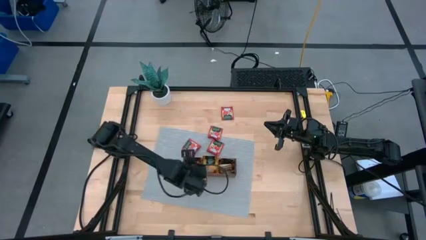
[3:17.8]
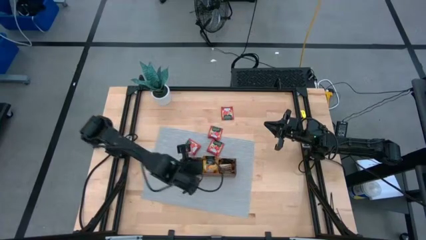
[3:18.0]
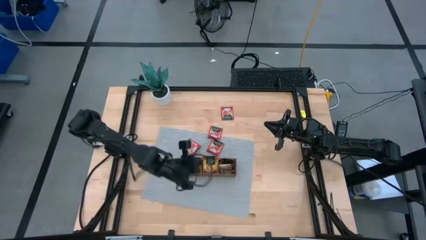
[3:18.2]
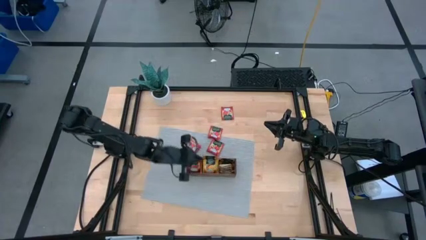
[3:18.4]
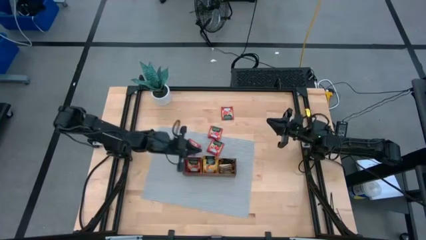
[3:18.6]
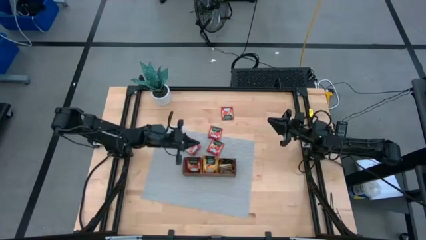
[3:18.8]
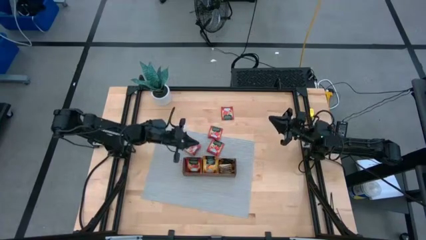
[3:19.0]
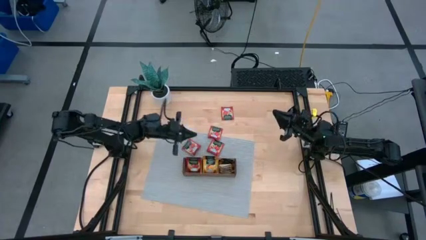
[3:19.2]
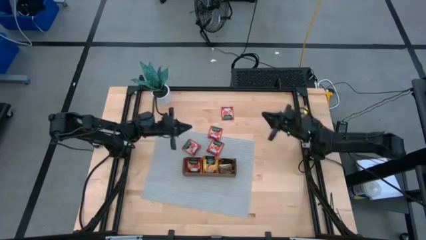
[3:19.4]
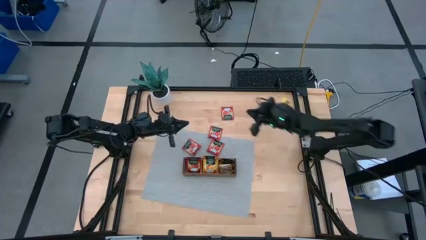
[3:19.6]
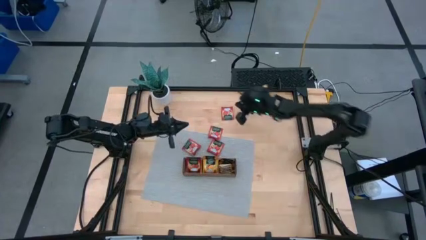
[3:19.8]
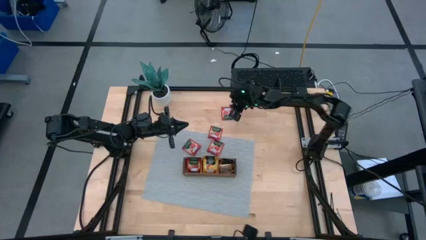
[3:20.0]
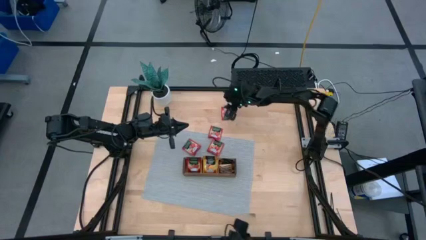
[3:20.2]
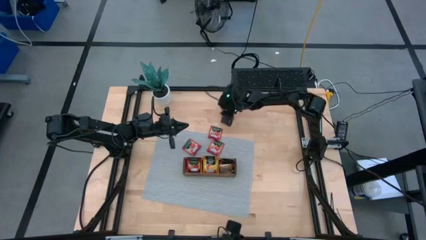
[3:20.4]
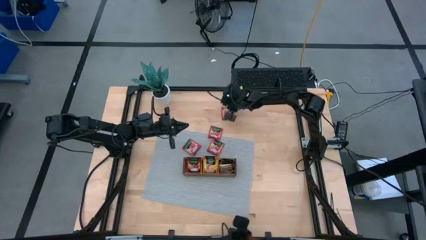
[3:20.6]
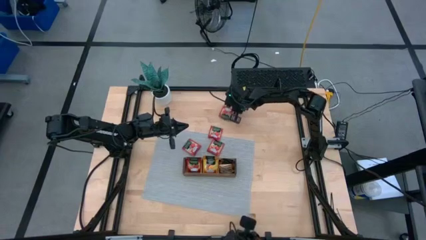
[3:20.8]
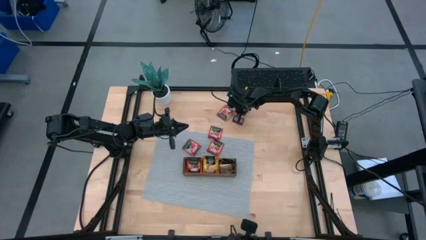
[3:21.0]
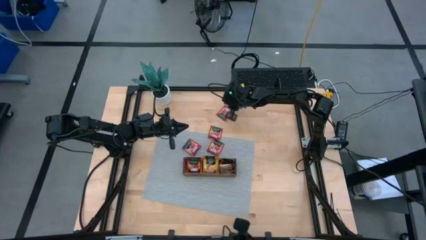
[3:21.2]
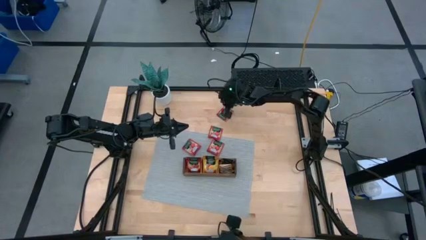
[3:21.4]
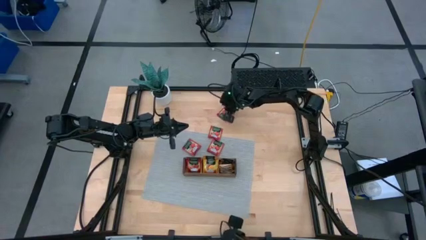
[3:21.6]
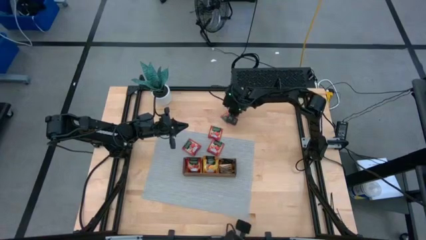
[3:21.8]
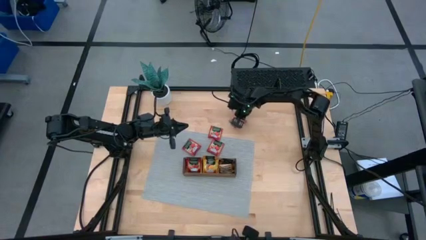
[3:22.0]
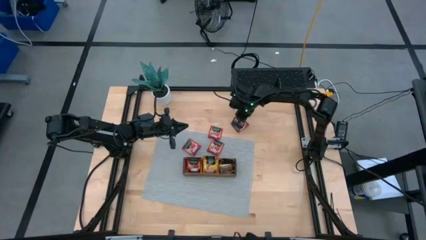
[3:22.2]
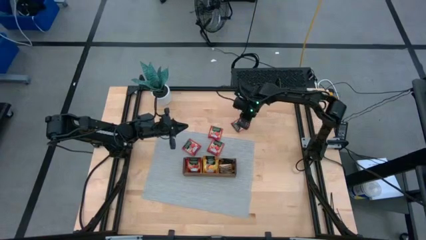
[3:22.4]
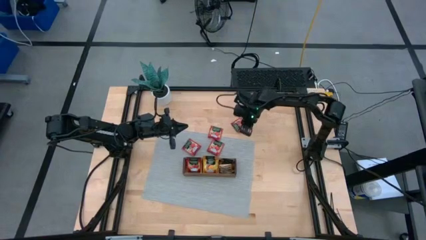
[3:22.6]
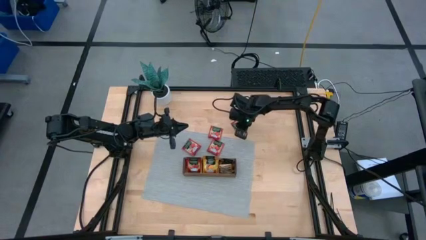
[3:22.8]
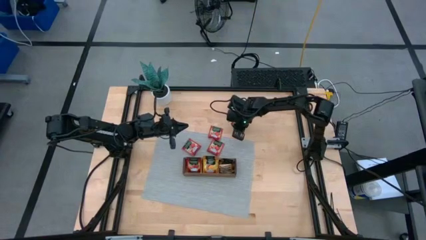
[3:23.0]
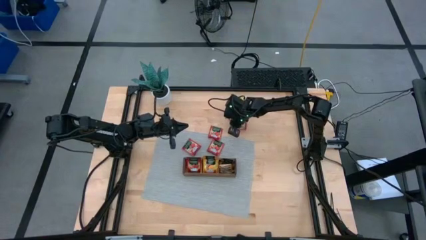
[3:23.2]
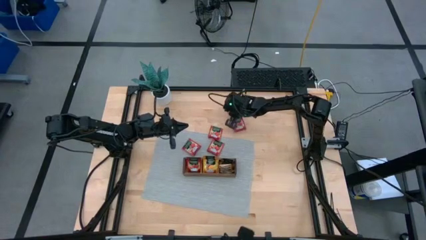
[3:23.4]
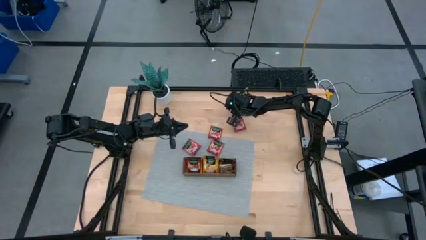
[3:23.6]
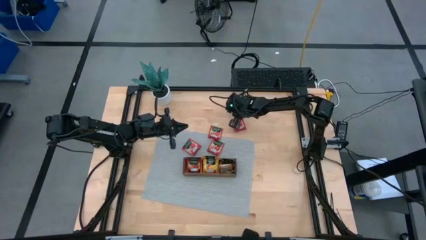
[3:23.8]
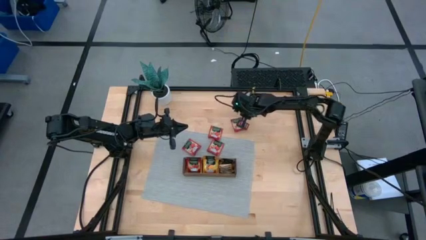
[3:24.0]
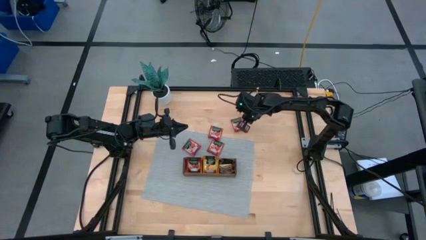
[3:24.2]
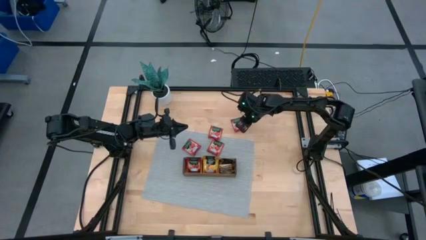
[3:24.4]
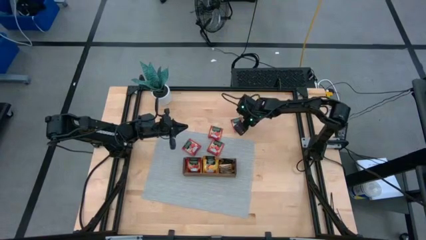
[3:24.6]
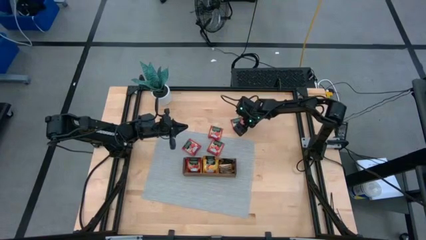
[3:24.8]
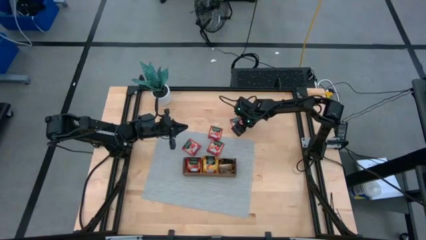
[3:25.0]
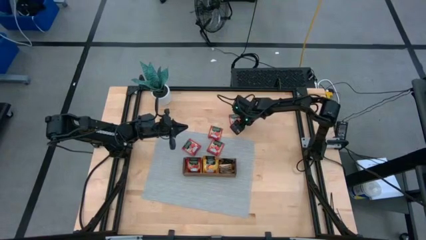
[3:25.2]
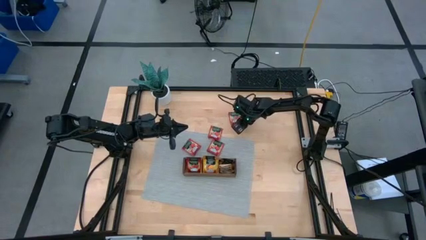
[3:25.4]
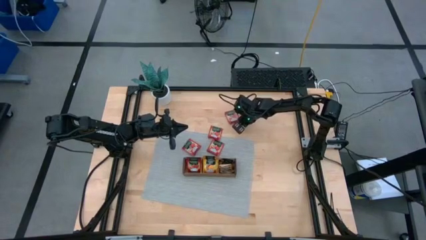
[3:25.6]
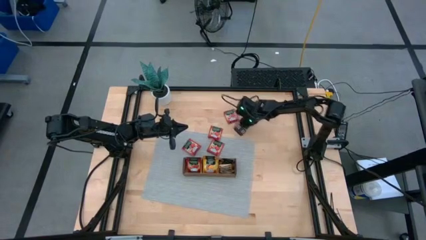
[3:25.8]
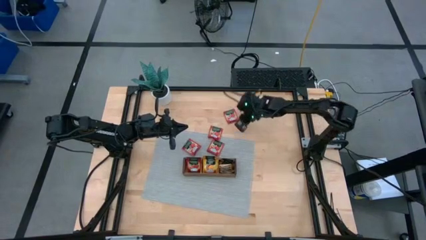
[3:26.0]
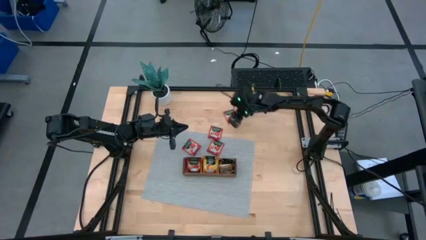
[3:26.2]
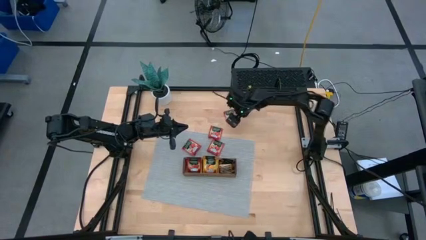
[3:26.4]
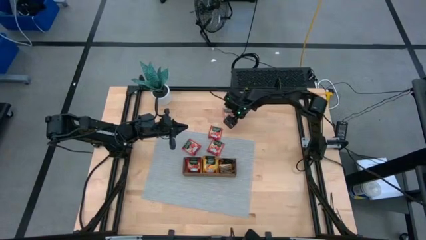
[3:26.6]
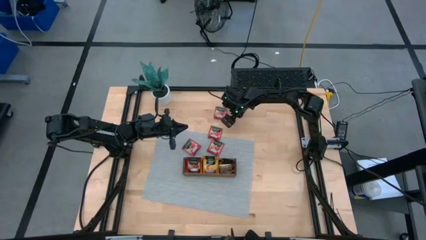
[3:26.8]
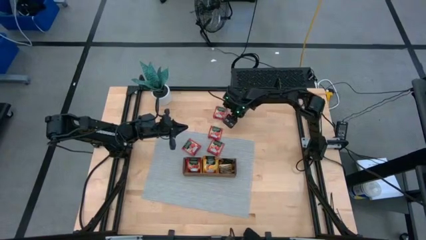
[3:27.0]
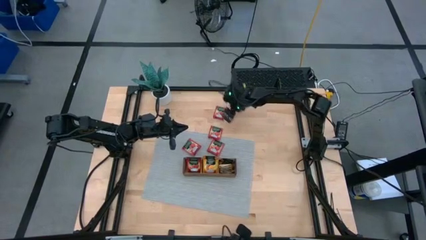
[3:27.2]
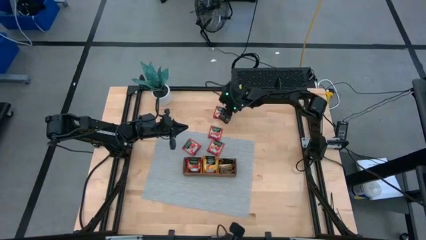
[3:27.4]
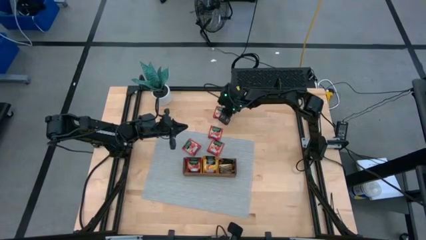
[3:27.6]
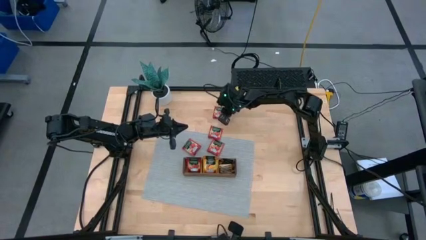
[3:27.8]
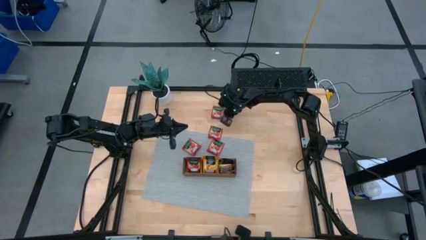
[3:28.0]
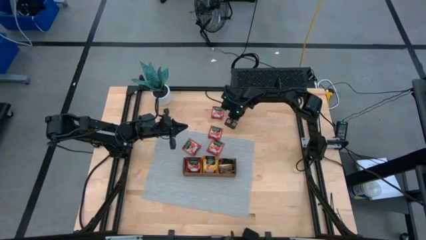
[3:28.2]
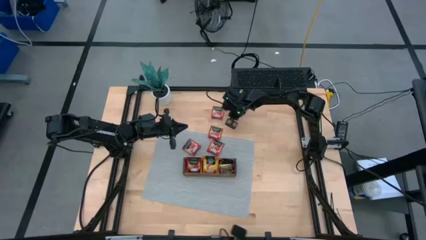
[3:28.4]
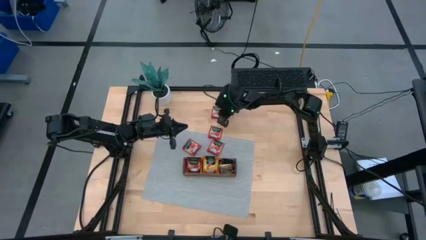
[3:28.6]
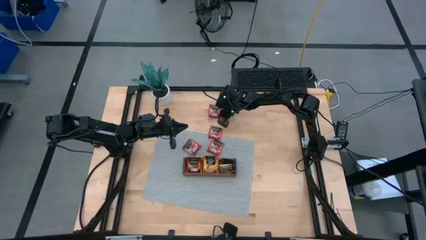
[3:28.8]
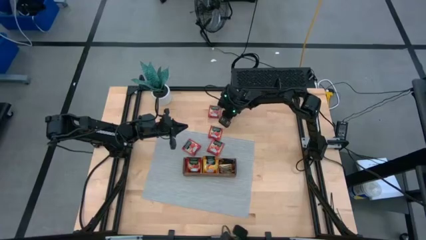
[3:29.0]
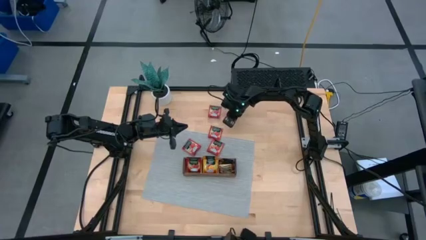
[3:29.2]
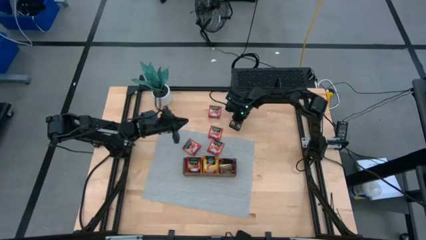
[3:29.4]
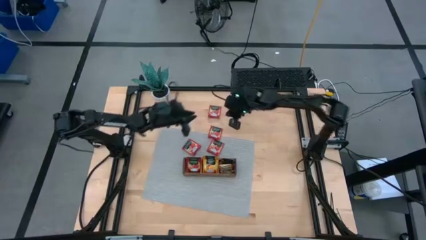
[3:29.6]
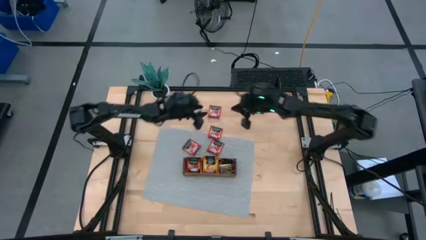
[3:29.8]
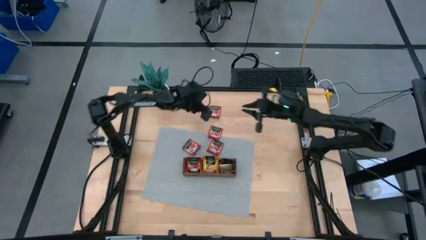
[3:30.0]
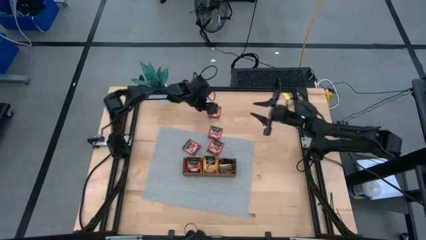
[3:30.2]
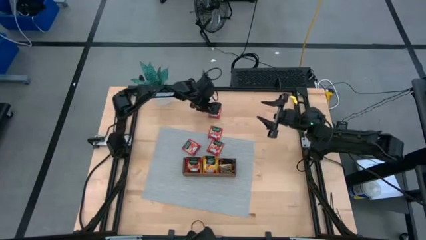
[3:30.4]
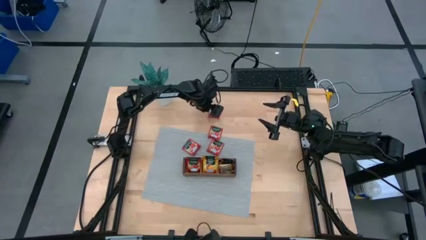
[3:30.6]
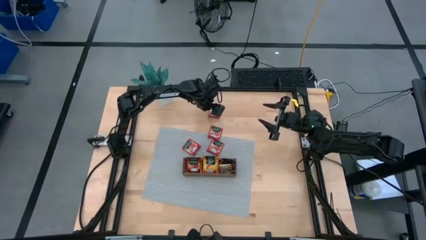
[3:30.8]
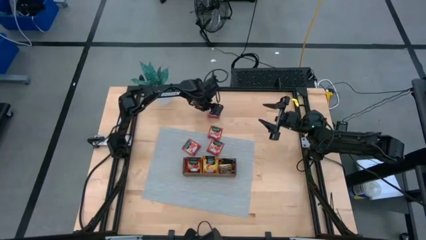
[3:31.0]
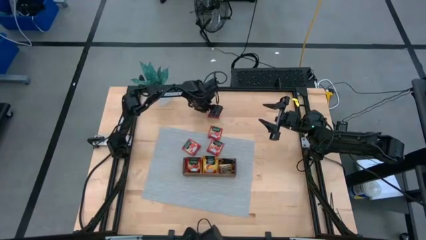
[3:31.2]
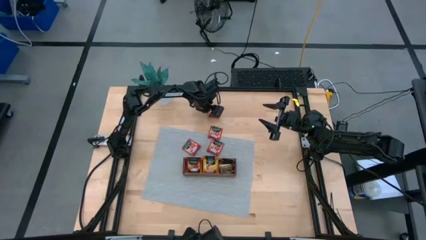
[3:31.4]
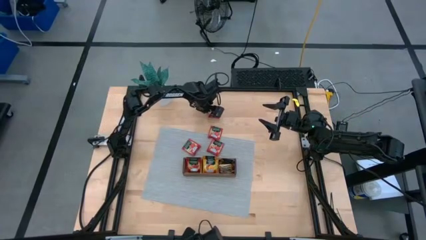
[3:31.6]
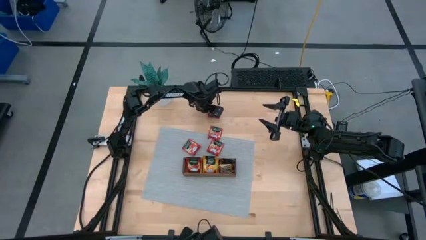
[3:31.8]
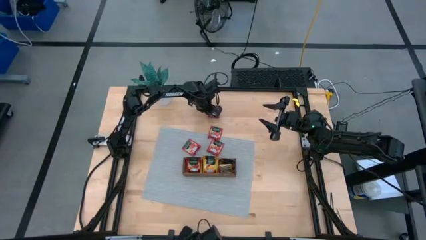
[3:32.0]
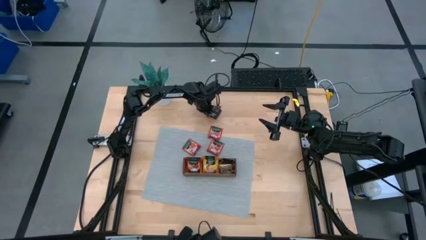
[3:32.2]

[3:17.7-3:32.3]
Task: Pick & Place Tea
Put the red tea bag into the left compartment of the wood organizer

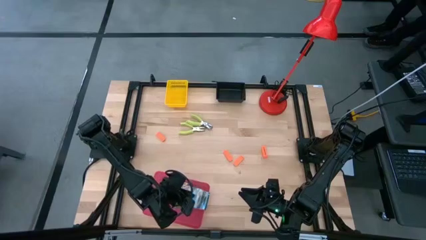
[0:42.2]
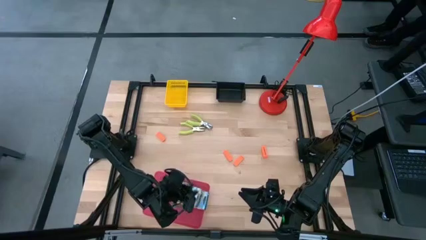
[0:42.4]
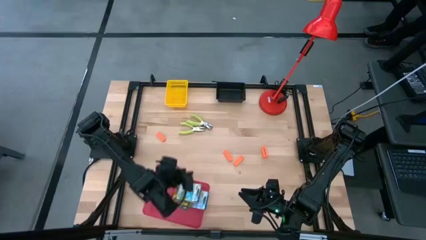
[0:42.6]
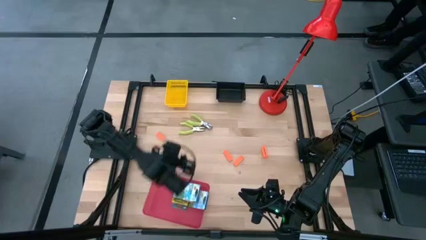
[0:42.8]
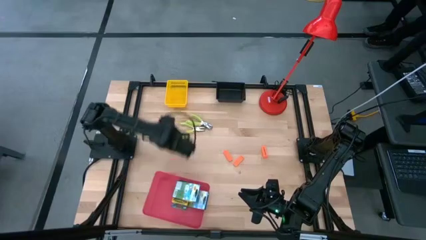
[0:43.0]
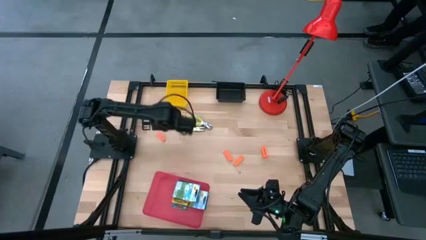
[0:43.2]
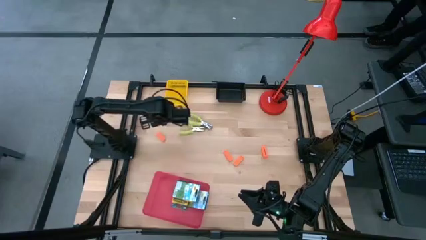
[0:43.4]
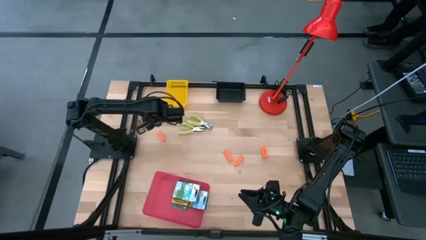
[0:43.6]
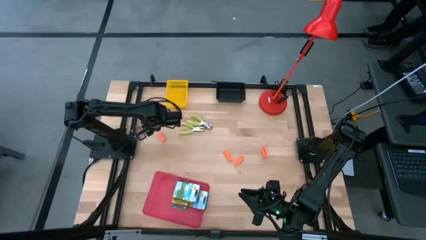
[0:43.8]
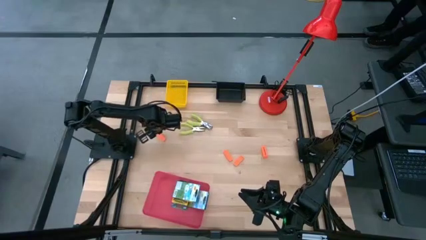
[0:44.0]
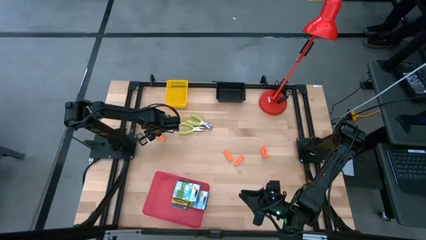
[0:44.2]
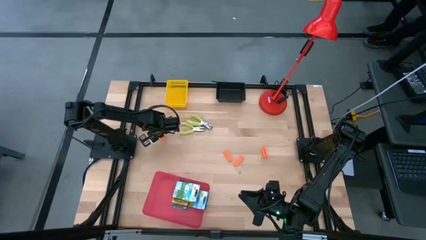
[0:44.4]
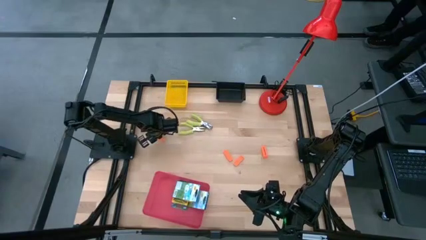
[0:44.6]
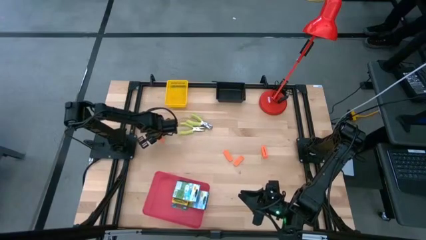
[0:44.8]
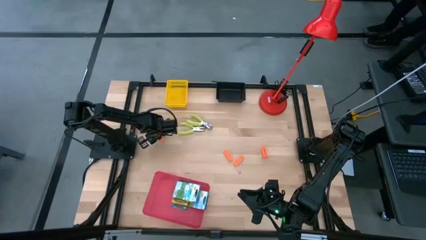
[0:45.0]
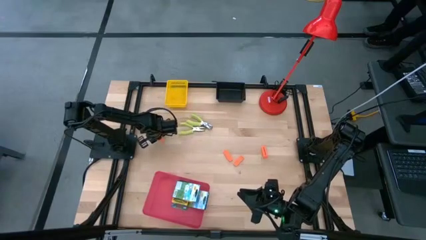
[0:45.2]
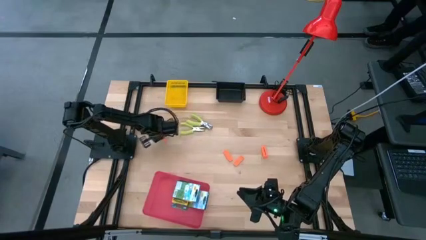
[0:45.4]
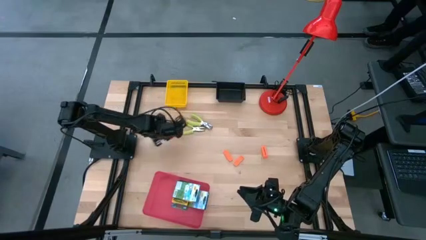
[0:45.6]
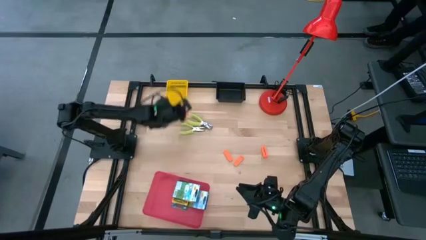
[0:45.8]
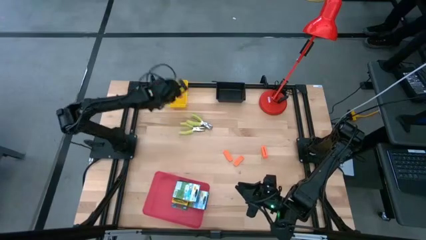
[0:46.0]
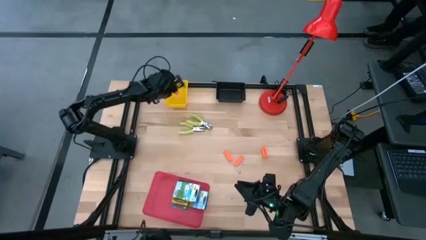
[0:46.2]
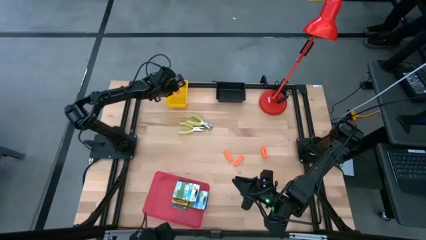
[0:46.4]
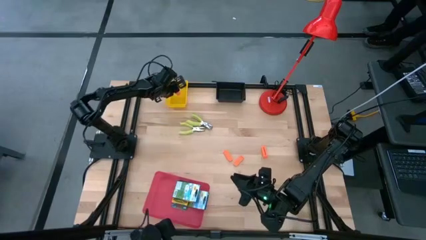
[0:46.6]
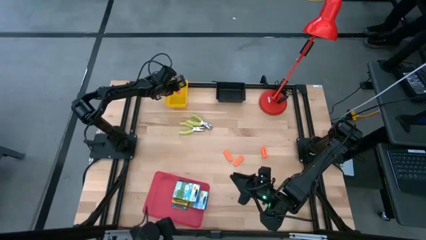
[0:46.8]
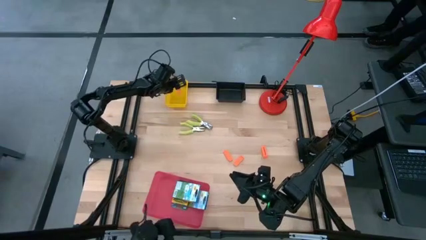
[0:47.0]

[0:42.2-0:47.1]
Task: Pick & Place School Supplies
Put the orange eraser into the yellow bin
